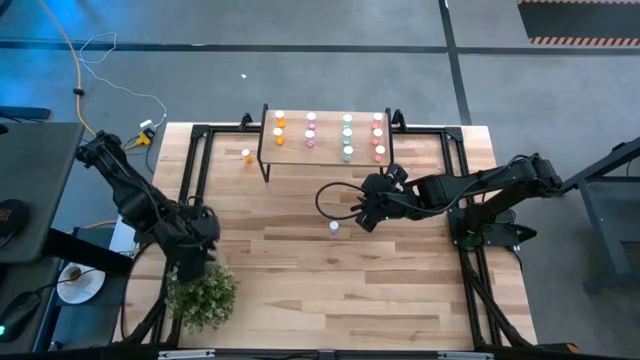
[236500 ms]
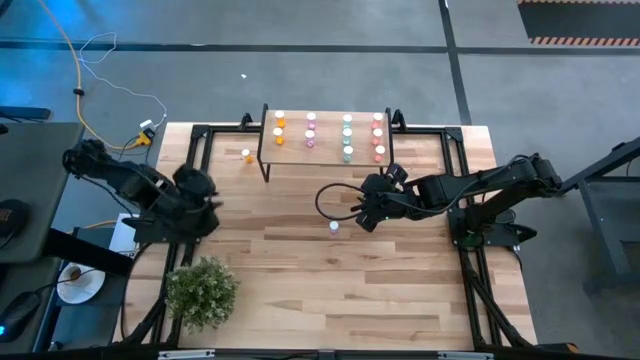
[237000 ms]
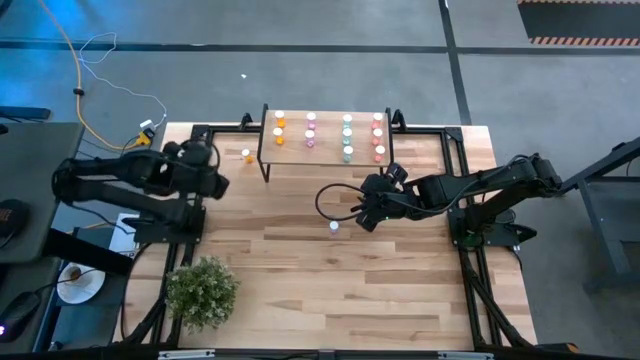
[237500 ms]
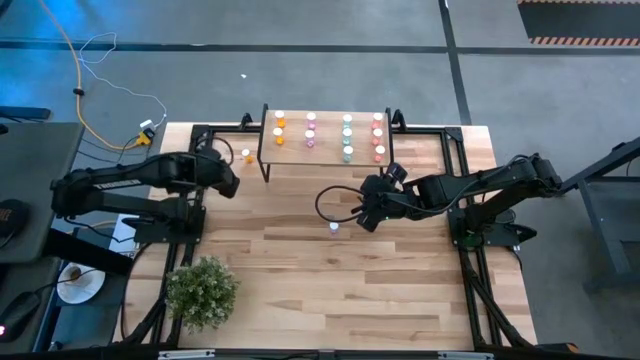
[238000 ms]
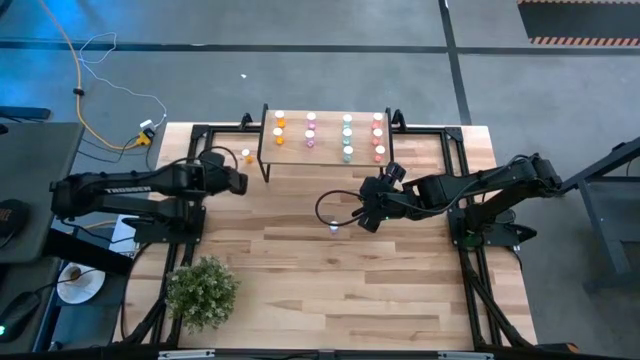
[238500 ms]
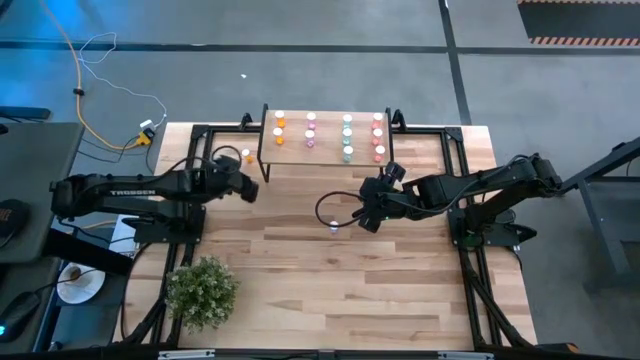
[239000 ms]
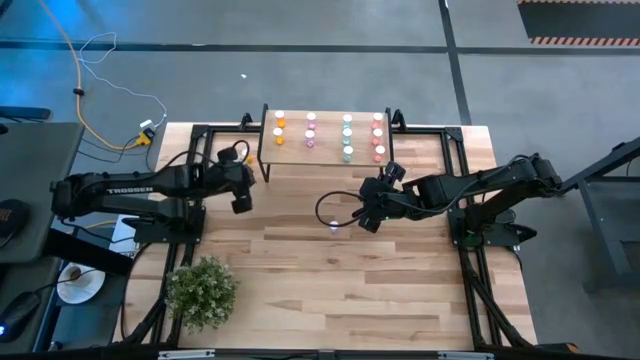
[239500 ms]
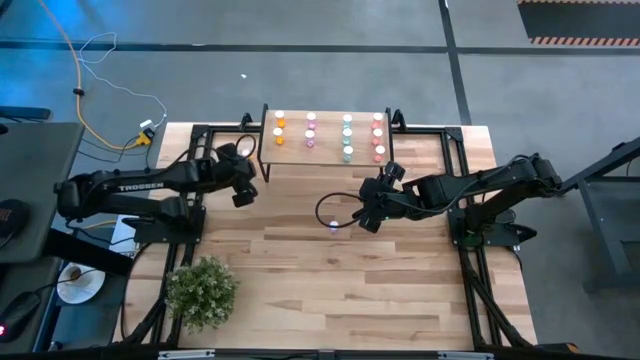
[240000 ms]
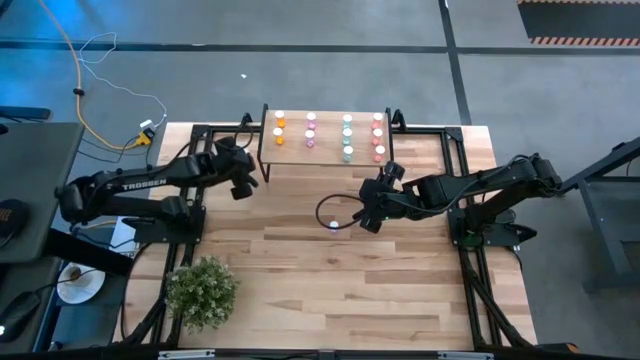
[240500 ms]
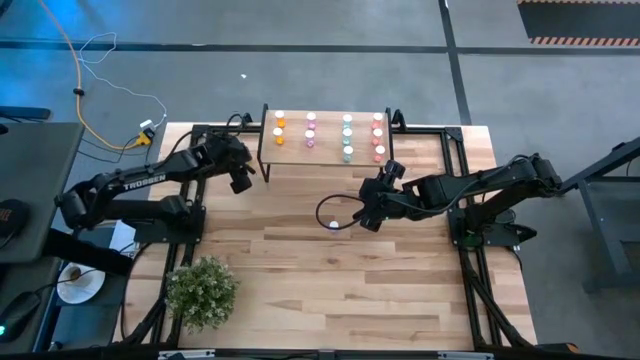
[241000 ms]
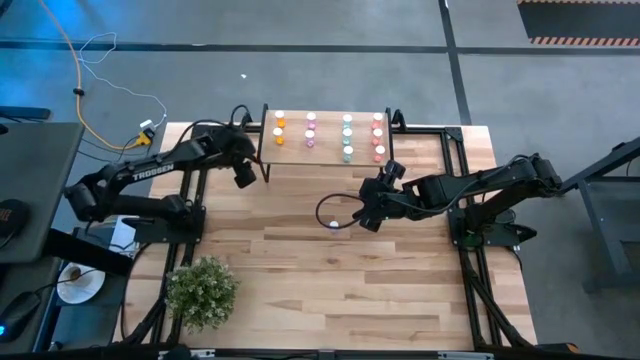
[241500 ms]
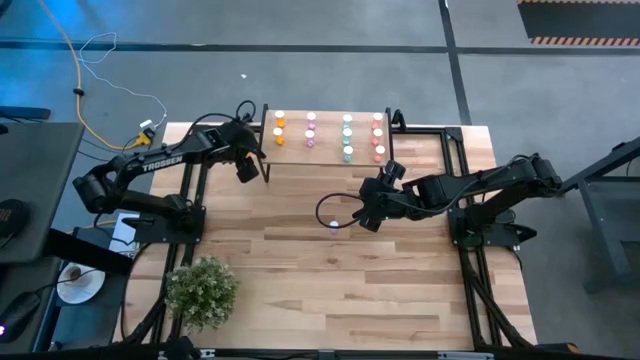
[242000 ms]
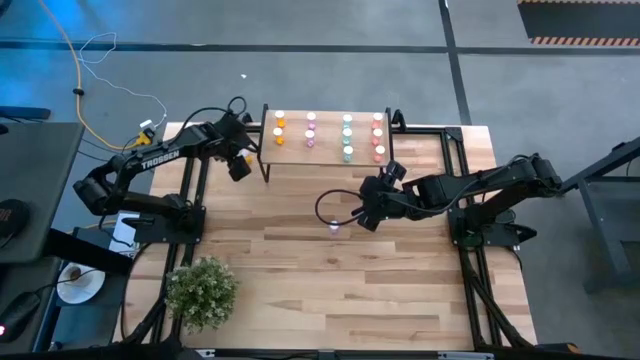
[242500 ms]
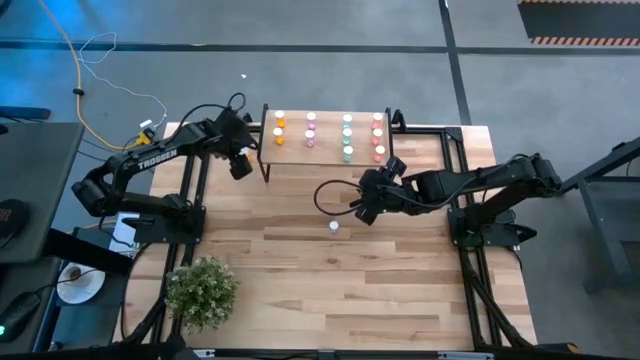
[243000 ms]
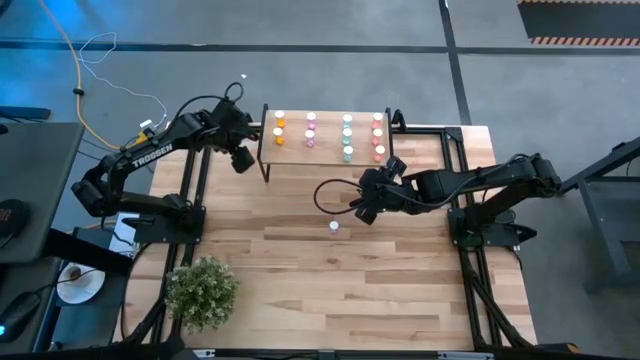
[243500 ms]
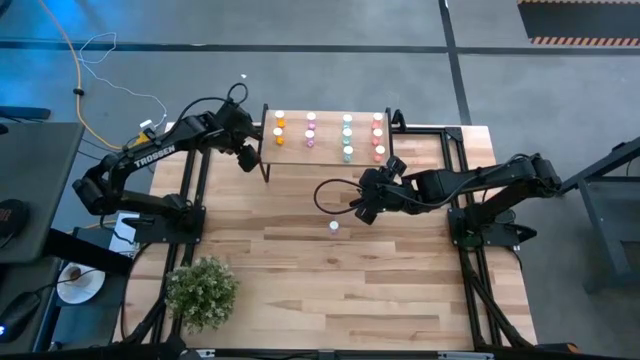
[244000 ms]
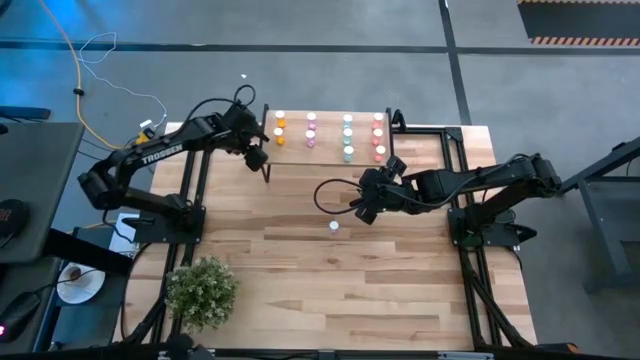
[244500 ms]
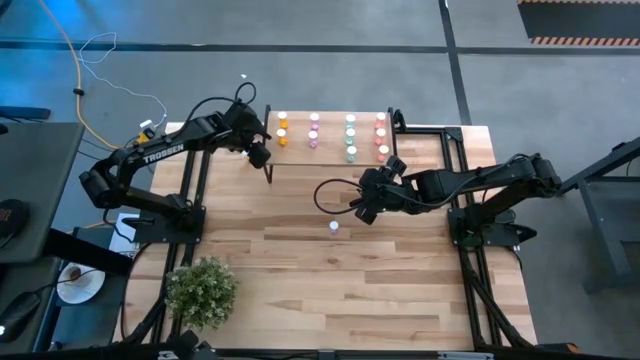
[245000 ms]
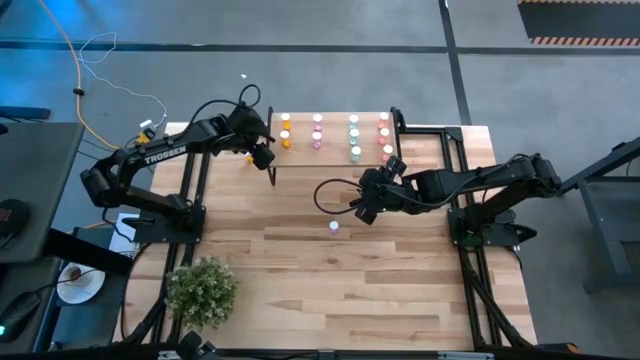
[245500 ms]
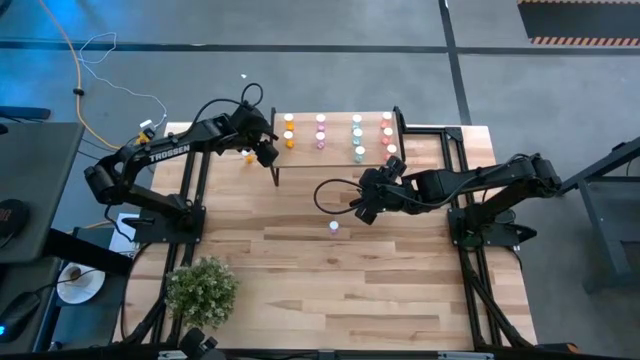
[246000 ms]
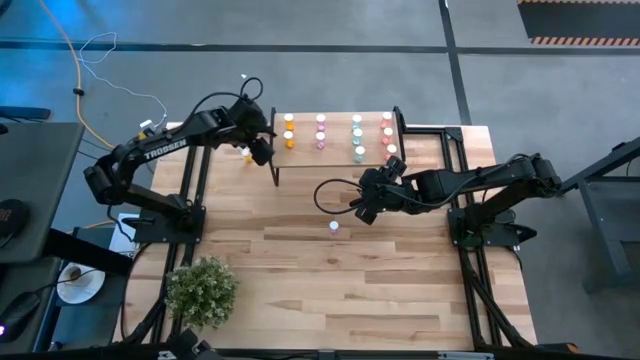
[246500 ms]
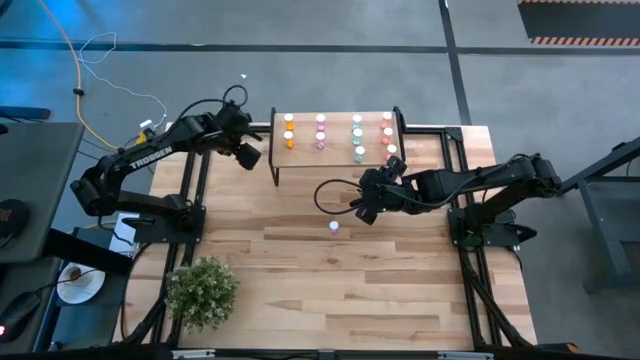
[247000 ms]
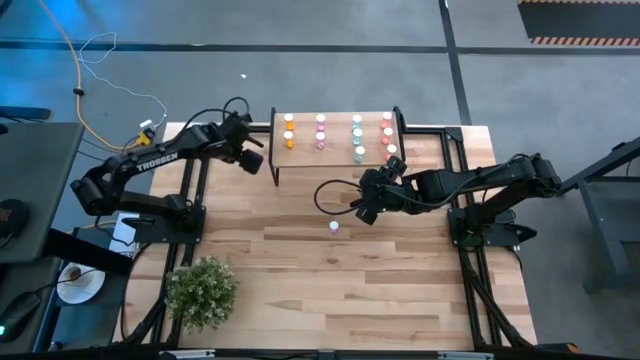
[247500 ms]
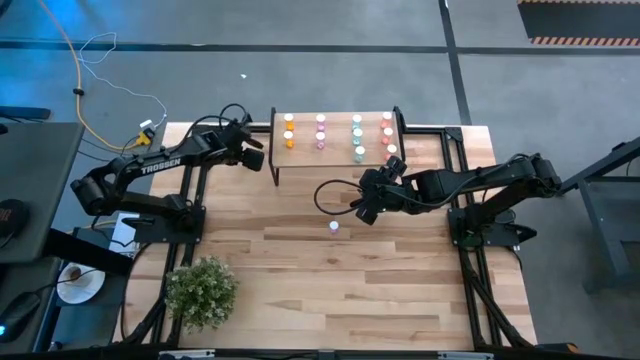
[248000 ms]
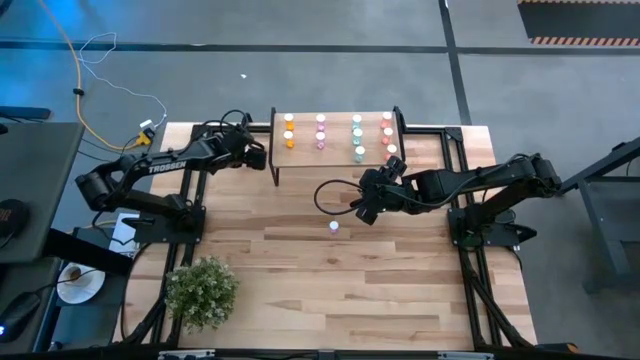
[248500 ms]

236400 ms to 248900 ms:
Task: Pick and place medicine bottles onto shelf by color
Put the orange pill bottle on the shelf aligned with the other orange pill bottles

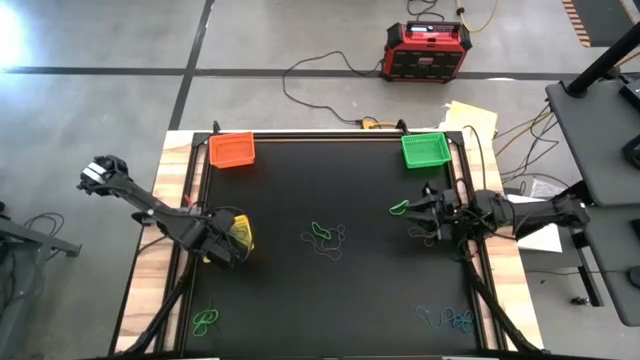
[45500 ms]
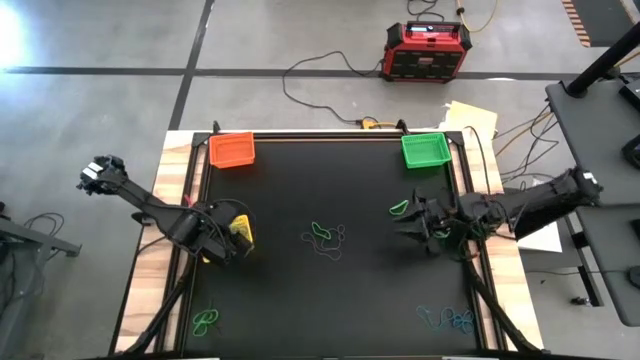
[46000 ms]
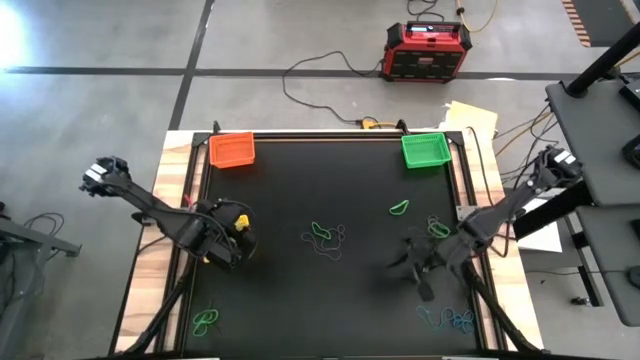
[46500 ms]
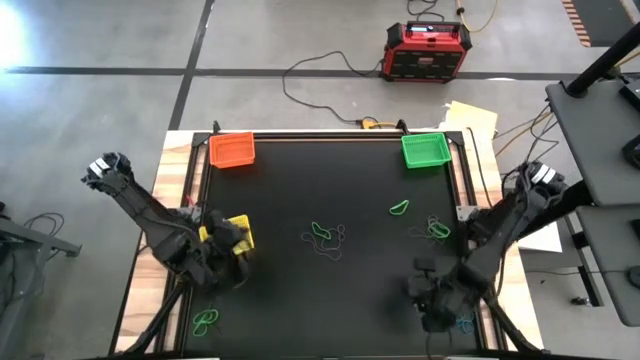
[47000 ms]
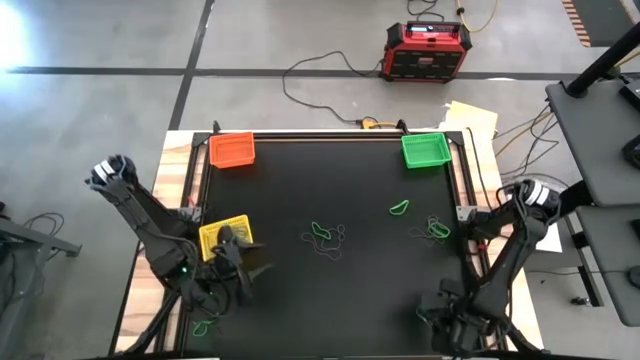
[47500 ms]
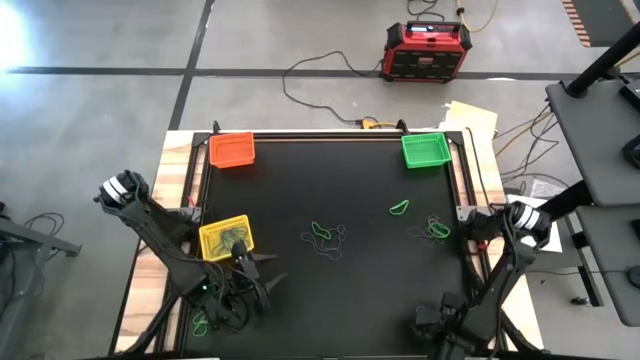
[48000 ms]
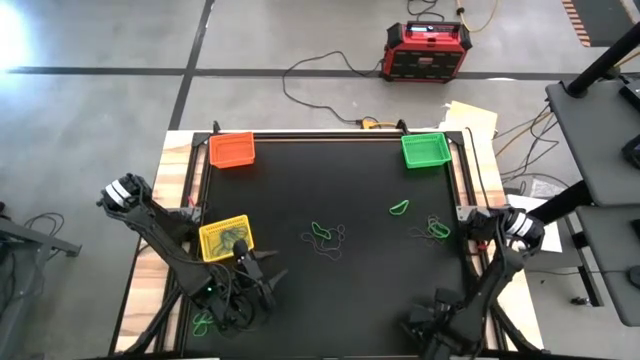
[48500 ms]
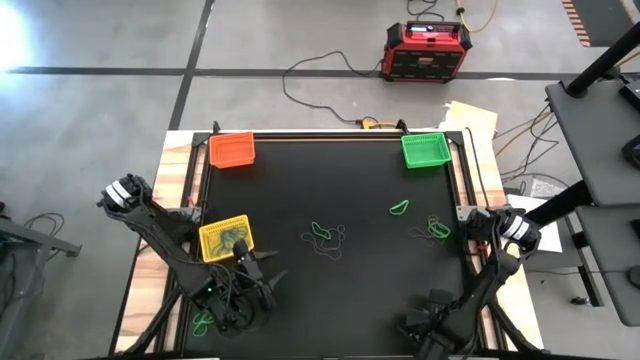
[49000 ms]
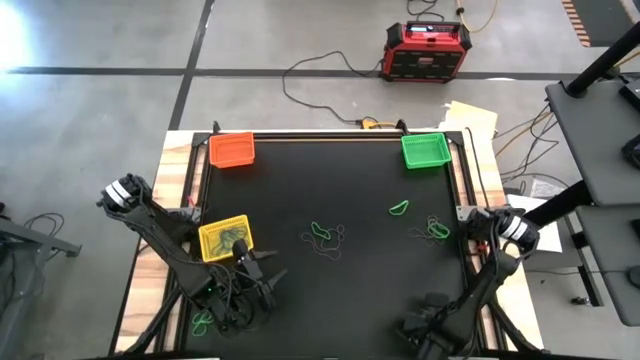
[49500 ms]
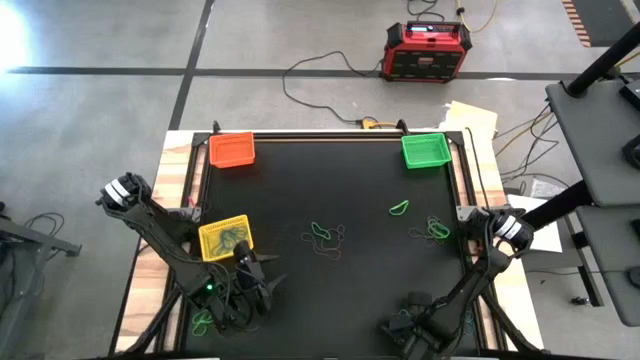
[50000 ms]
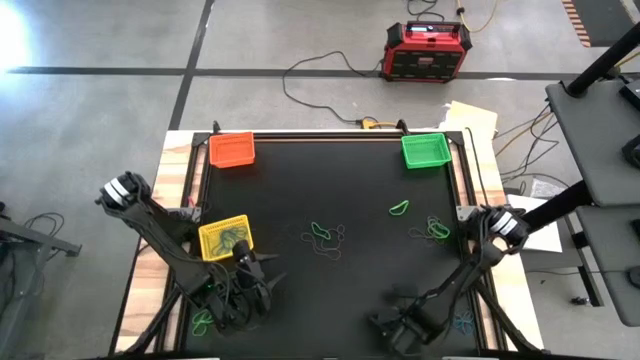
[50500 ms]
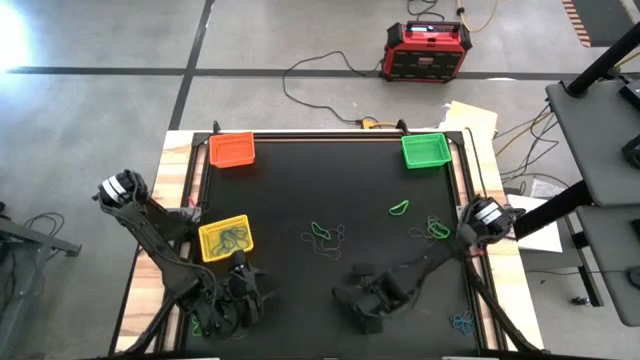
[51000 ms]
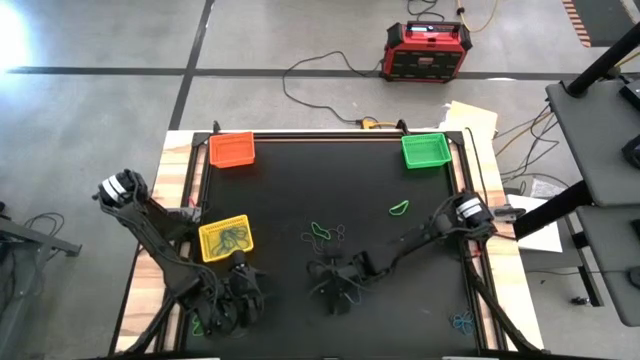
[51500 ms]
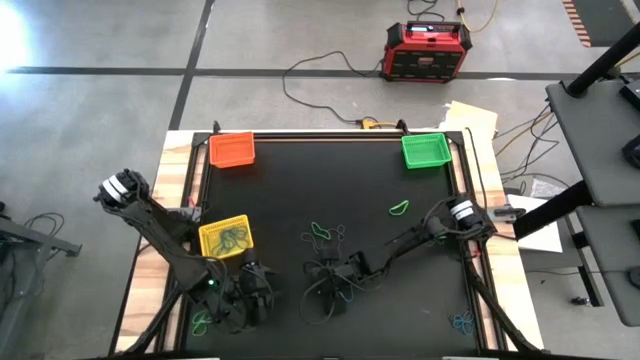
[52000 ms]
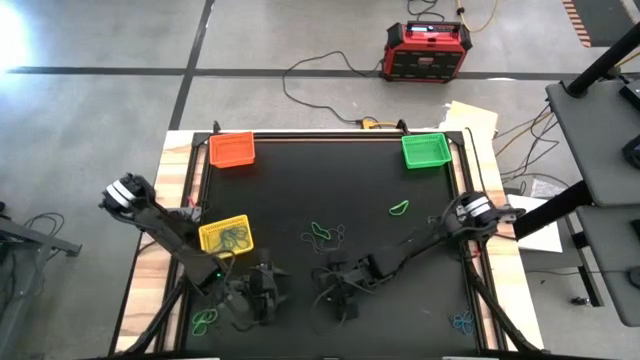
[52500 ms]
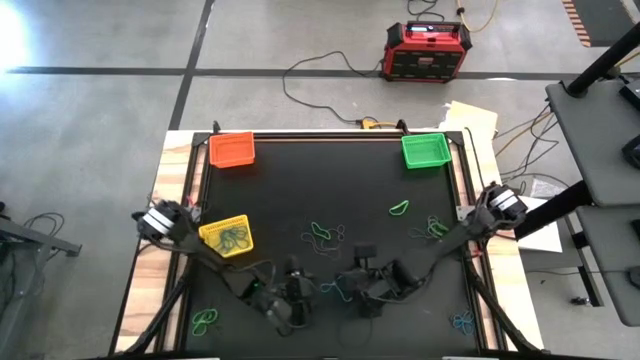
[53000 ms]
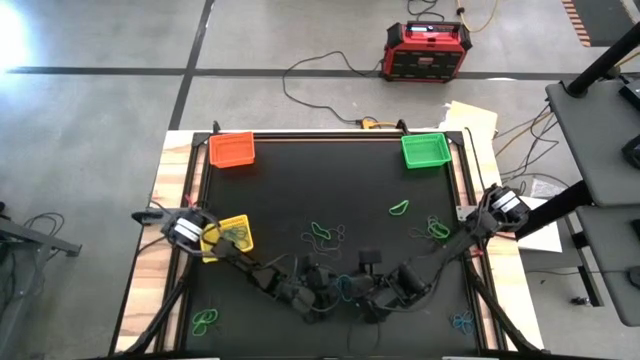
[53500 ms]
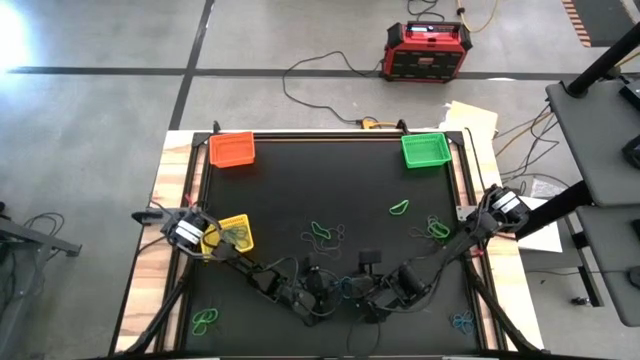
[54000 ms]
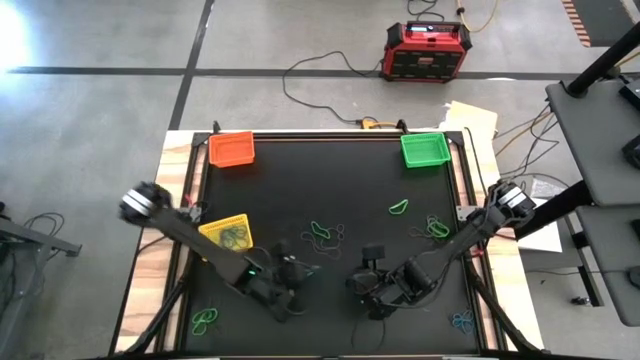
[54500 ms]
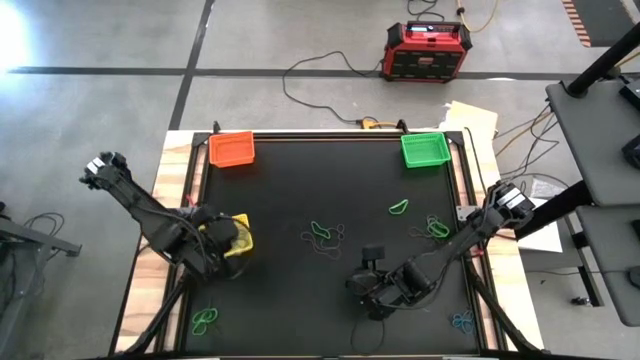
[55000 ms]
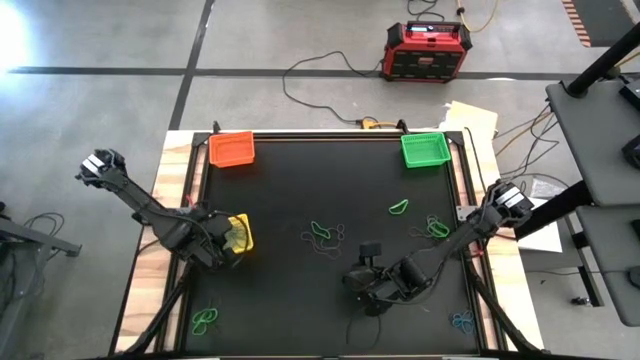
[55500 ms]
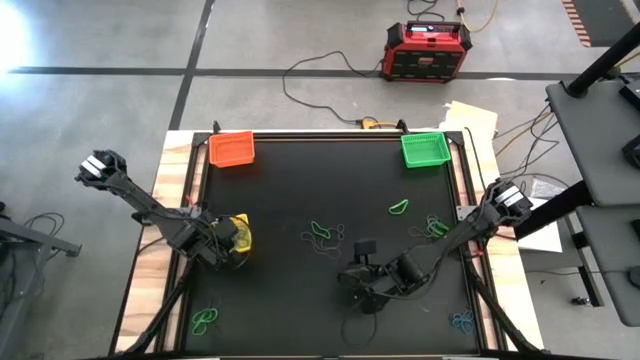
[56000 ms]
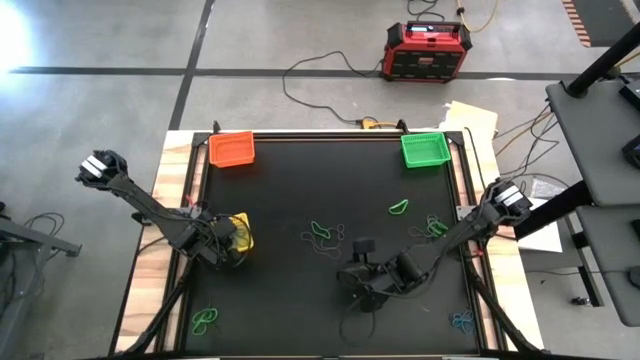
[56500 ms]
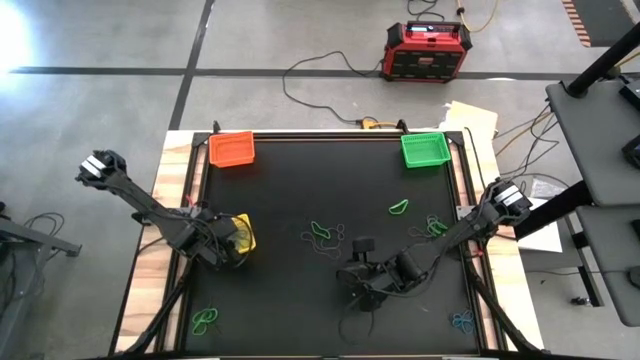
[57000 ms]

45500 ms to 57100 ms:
Task: Sort rubber bands into baskets
Put the blue rubber band into the yellow bin
